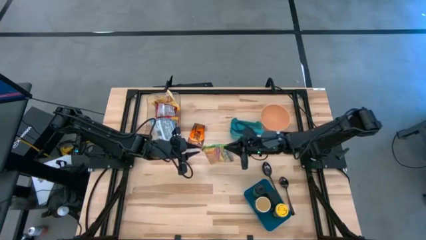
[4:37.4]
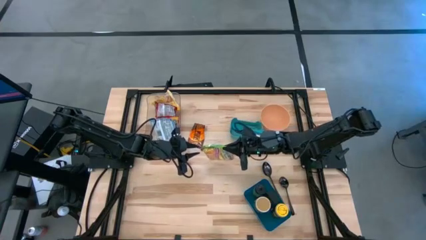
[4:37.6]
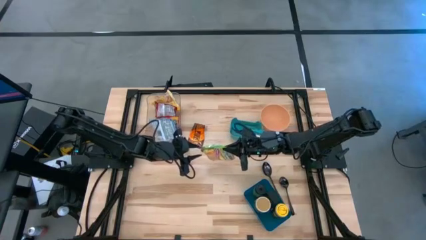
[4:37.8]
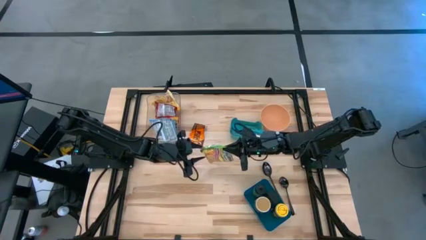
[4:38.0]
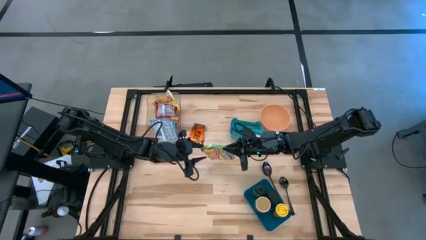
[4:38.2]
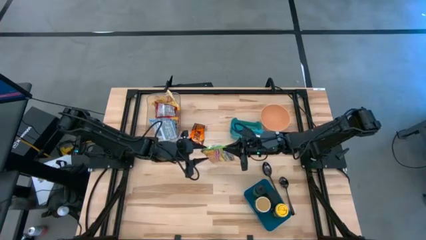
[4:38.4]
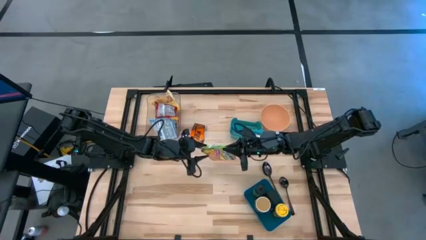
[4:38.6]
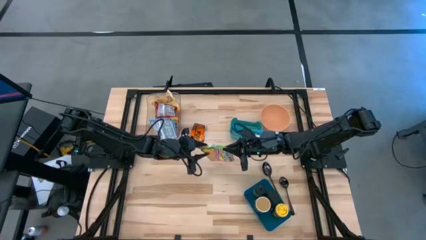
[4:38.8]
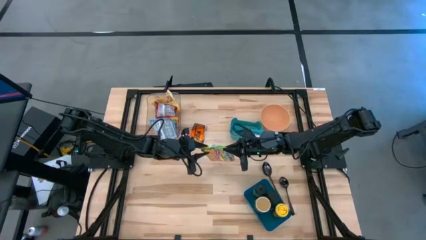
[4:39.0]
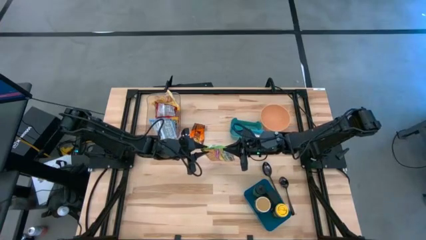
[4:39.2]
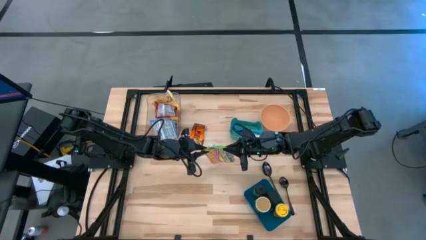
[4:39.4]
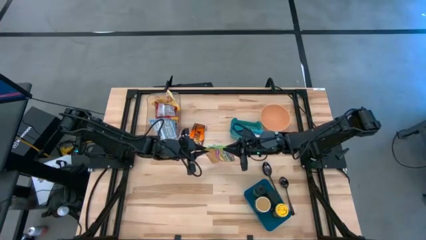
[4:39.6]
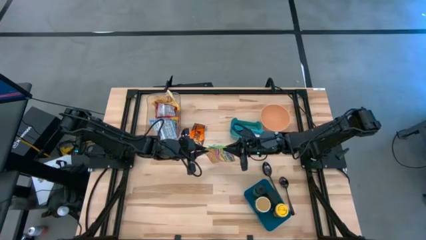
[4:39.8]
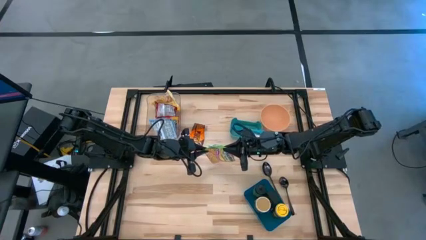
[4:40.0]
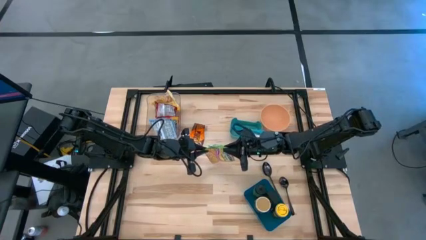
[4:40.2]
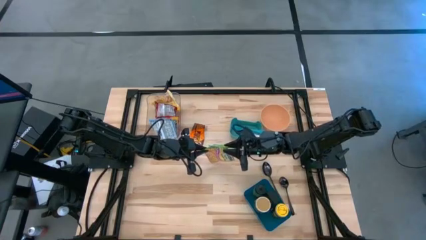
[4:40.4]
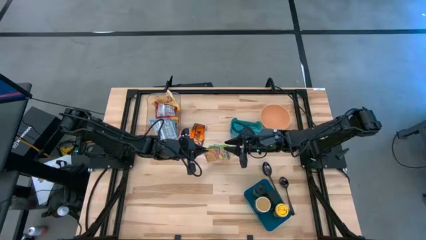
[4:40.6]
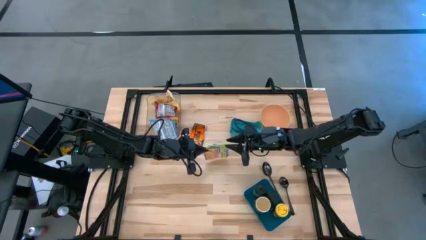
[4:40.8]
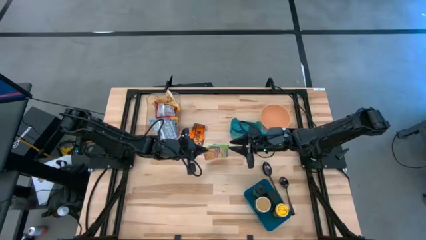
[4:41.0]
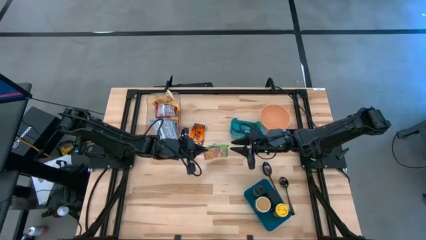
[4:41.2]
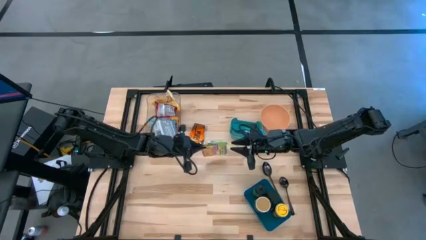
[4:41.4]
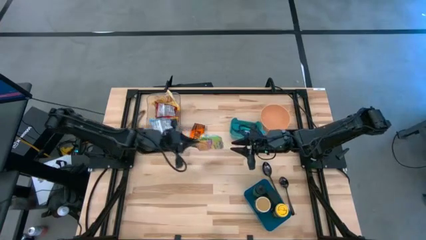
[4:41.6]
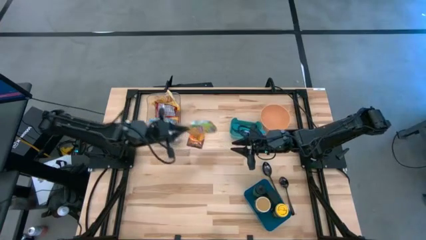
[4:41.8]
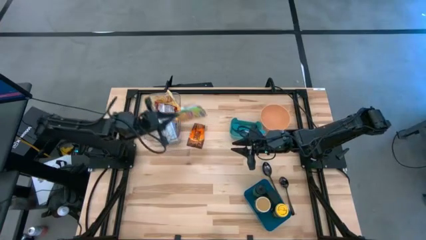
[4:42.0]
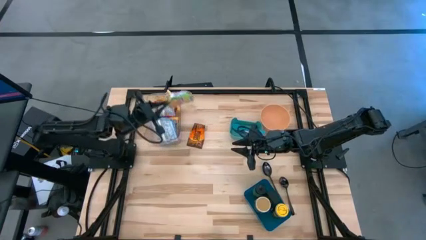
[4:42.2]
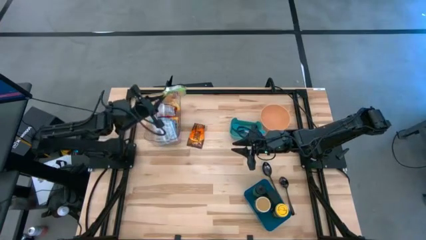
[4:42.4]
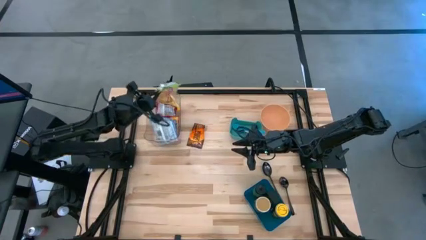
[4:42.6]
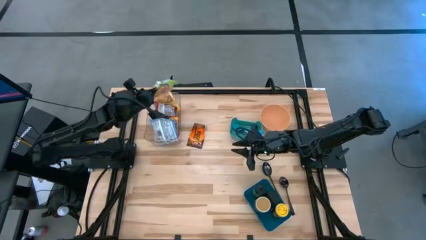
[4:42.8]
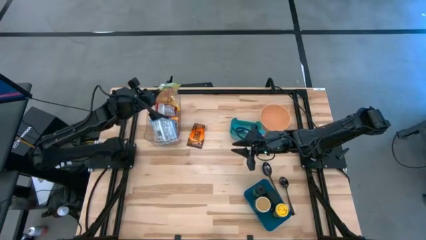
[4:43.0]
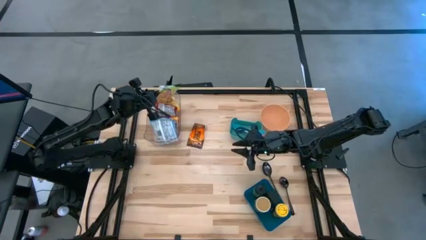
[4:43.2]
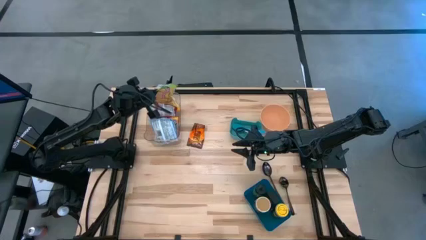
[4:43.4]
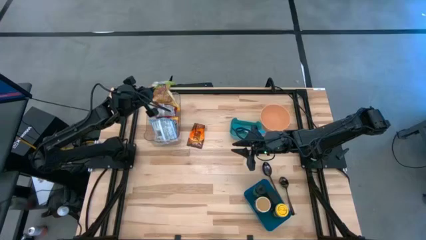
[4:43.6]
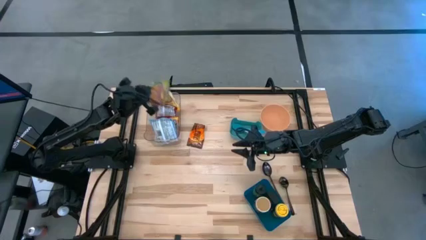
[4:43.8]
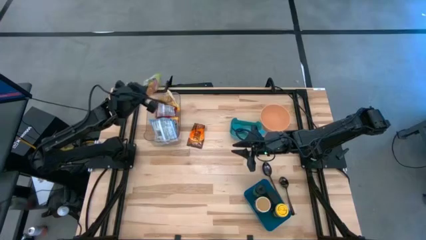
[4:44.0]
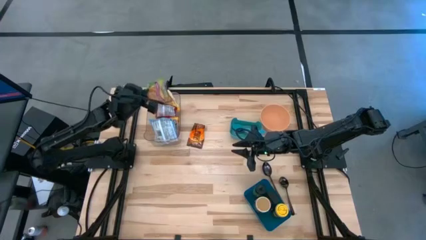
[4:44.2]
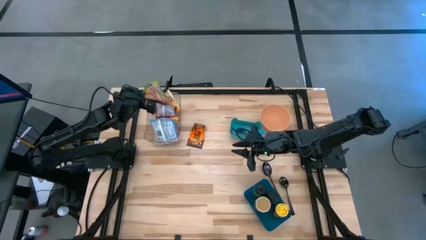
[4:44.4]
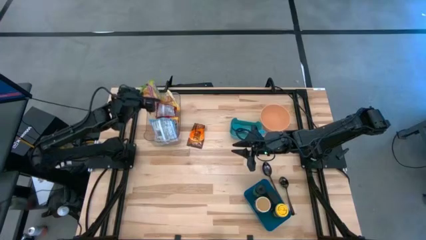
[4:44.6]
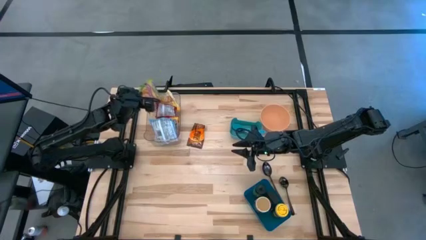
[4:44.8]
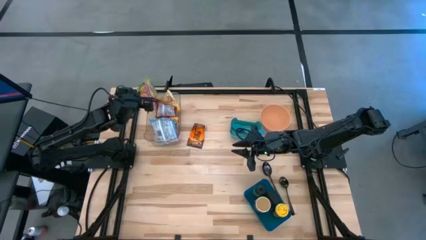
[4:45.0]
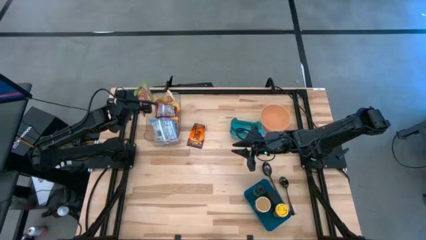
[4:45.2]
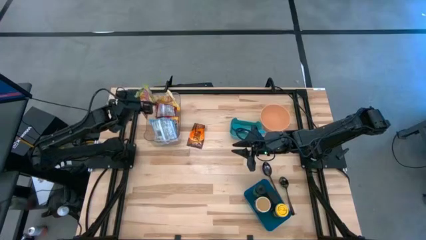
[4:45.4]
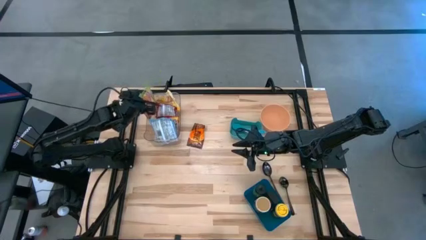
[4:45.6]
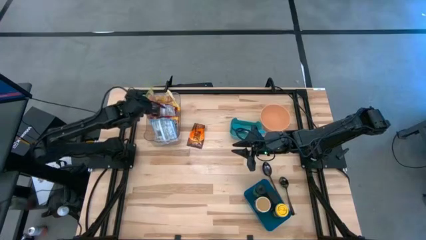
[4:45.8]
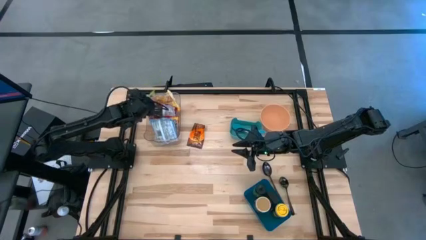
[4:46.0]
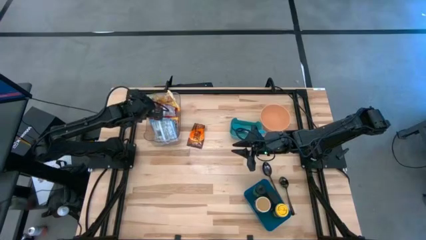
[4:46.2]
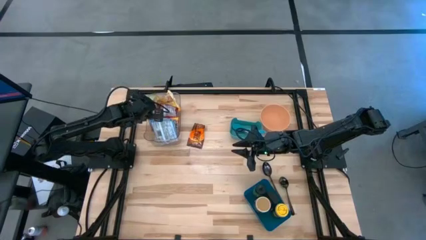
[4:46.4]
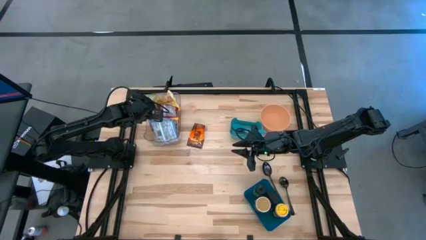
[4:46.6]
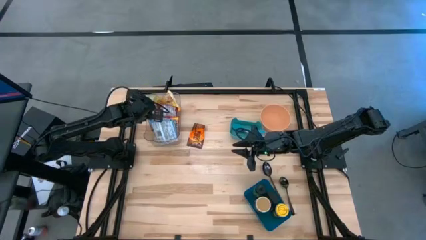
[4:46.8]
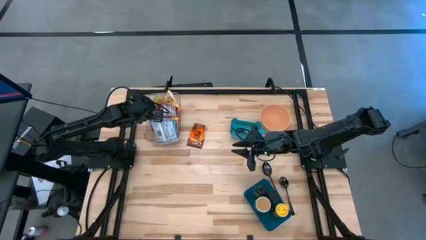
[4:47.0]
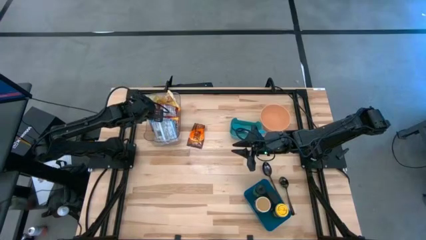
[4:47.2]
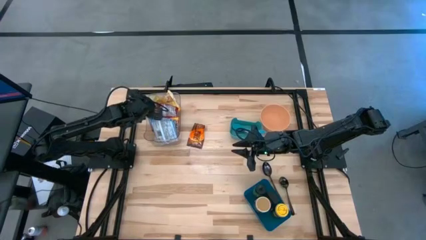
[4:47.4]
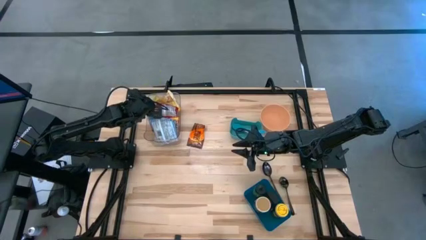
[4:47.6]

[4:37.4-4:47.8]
Task: Pick & Place Food Item
Put the green noodle pack into the transparent bin

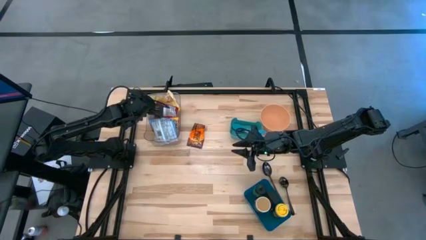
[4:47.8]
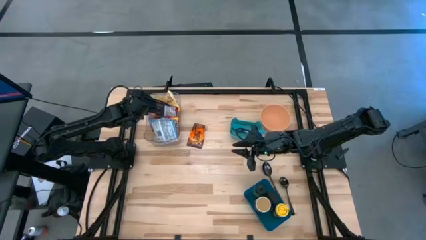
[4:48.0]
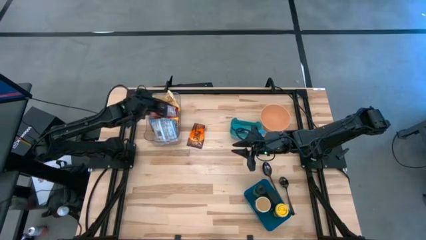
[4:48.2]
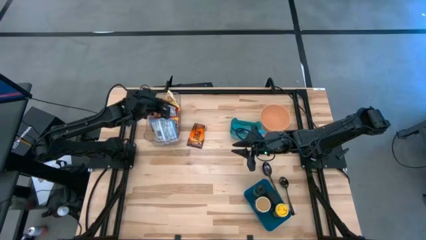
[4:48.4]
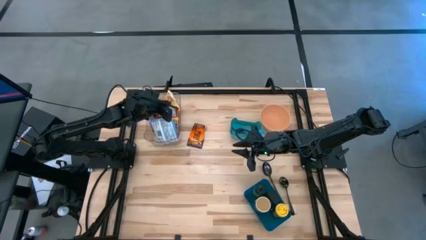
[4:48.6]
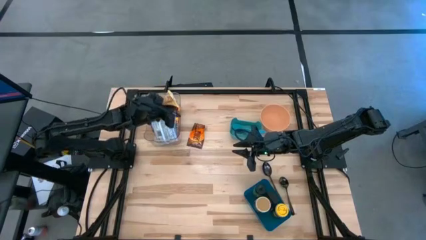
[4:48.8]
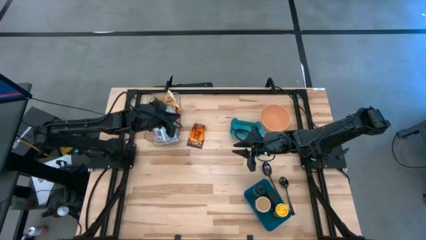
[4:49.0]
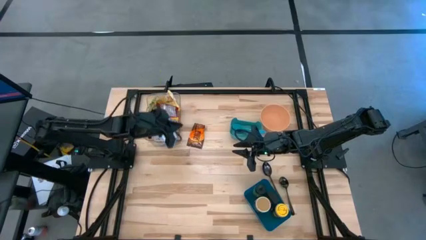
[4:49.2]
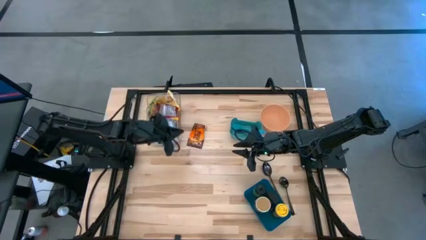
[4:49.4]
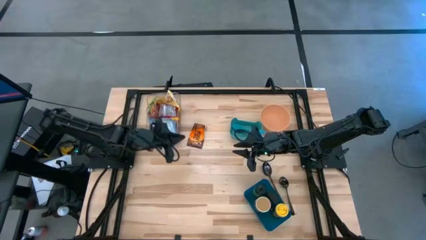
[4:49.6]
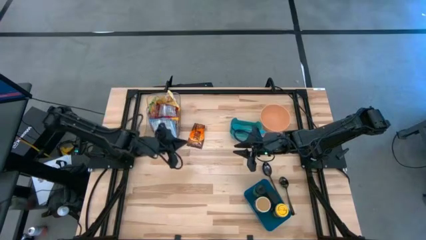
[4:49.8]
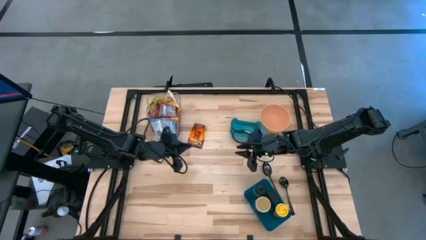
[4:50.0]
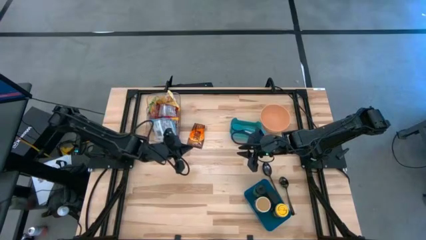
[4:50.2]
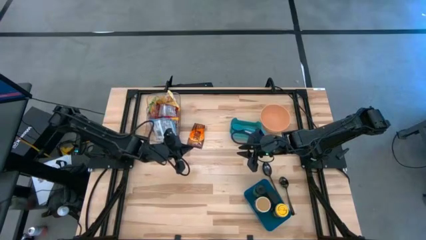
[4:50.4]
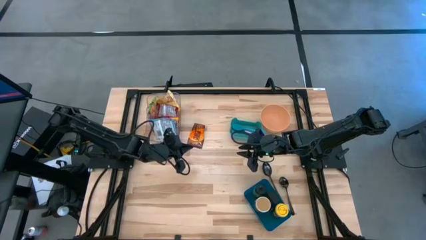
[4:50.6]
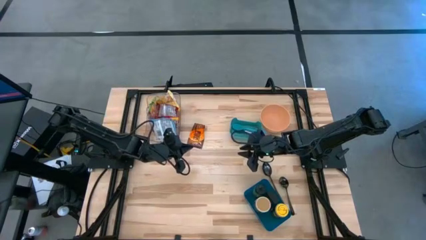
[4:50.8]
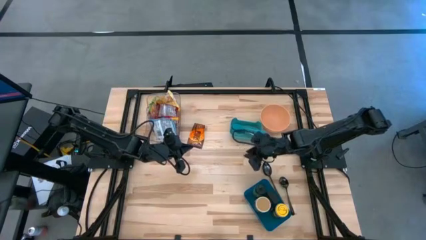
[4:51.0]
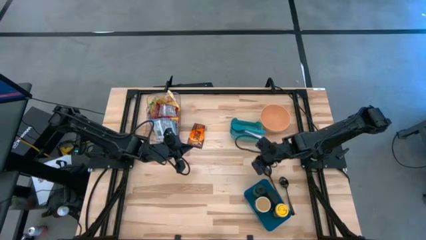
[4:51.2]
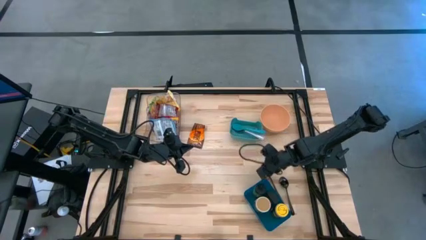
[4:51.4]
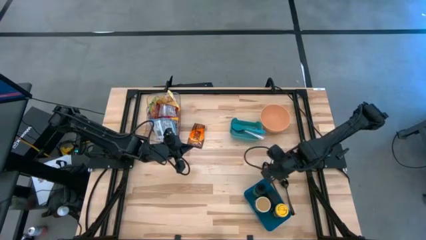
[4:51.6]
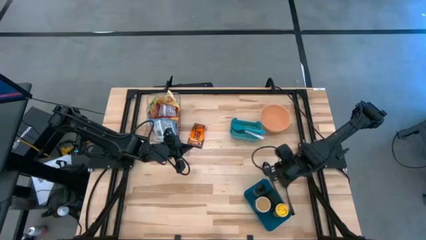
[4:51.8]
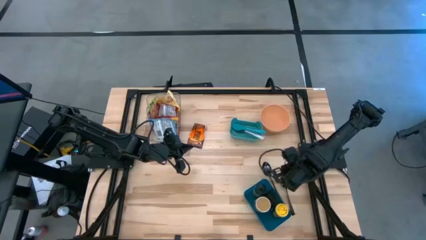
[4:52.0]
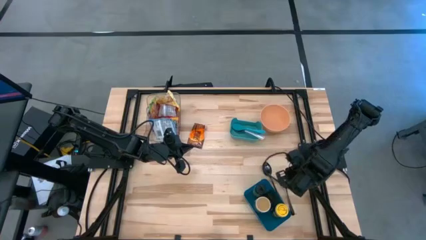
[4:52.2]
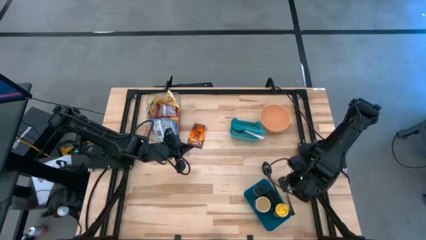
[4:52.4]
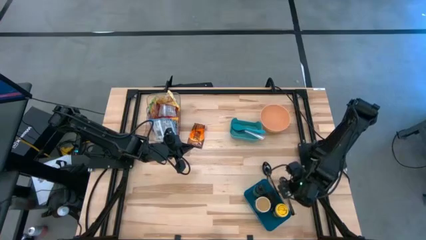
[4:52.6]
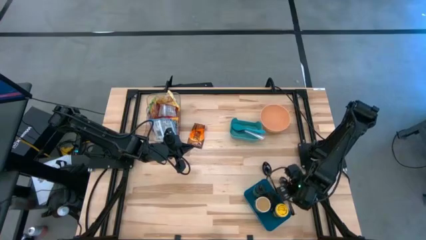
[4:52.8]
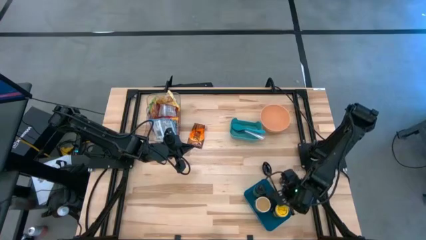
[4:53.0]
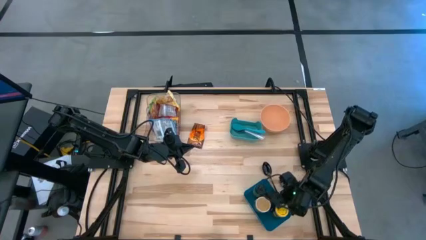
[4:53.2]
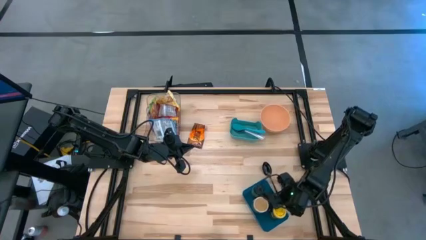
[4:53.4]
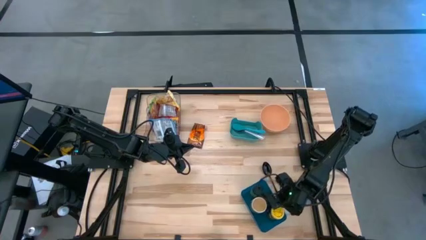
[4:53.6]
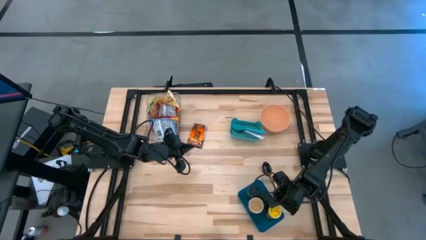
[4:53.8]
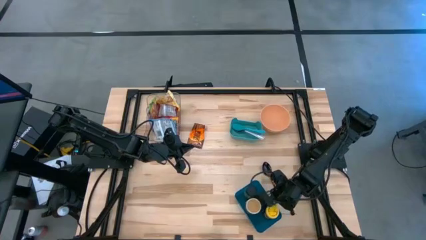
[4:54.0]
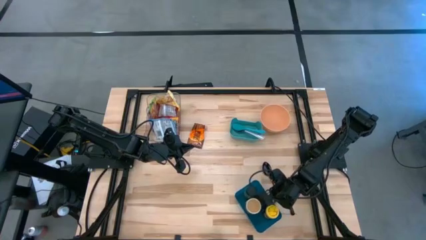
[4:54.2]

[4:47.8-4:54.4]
Adjust the blue bin
